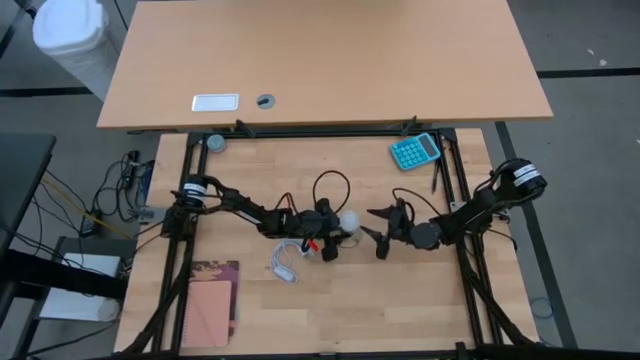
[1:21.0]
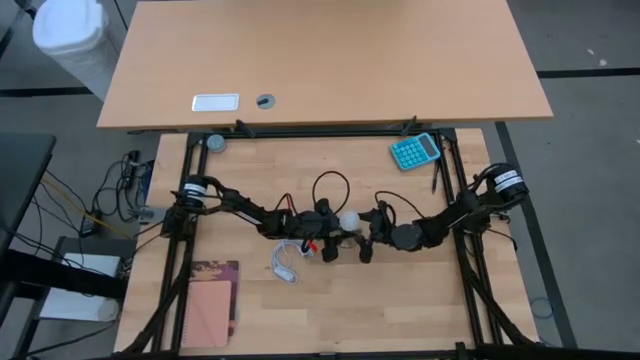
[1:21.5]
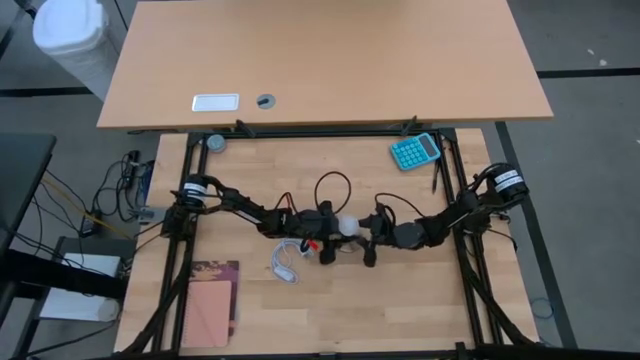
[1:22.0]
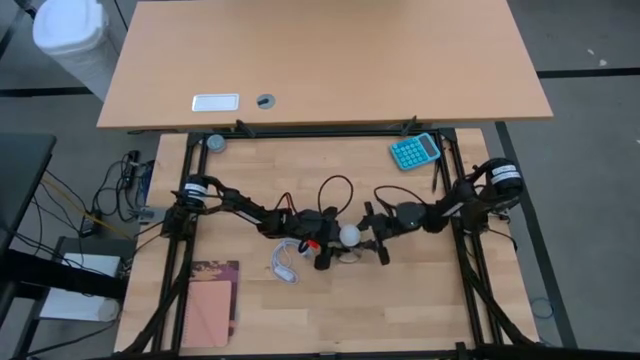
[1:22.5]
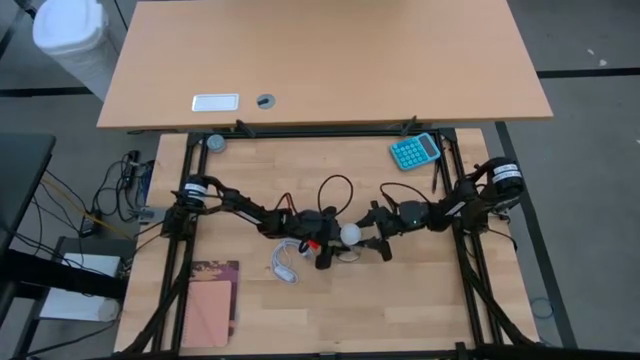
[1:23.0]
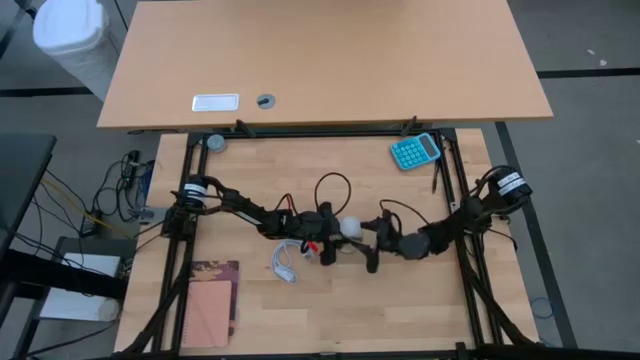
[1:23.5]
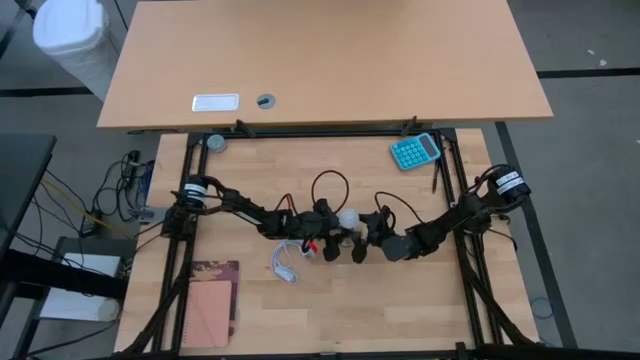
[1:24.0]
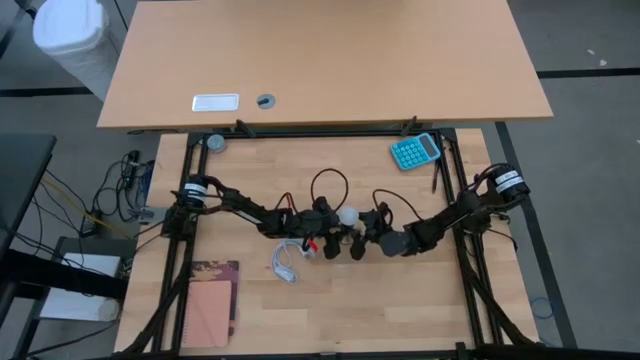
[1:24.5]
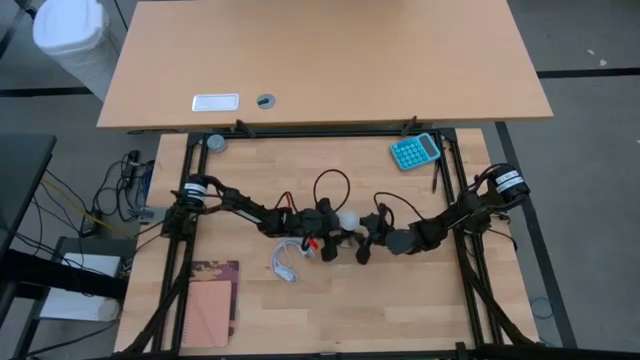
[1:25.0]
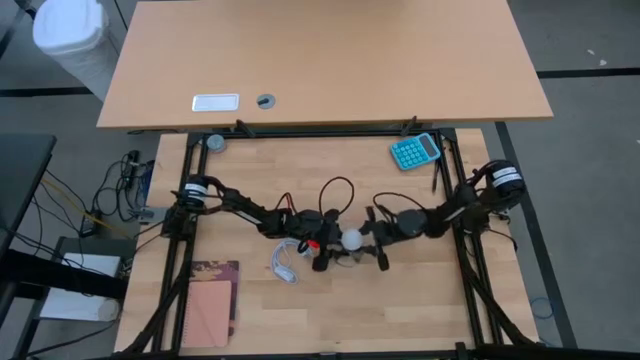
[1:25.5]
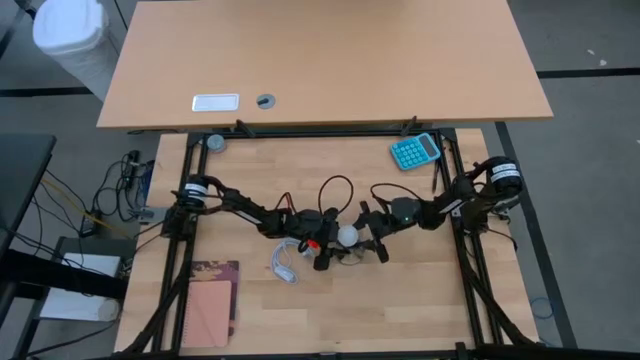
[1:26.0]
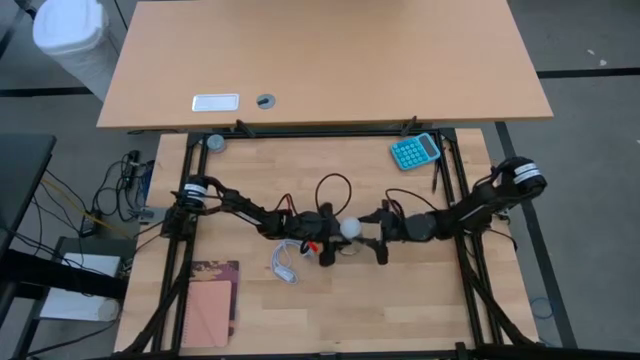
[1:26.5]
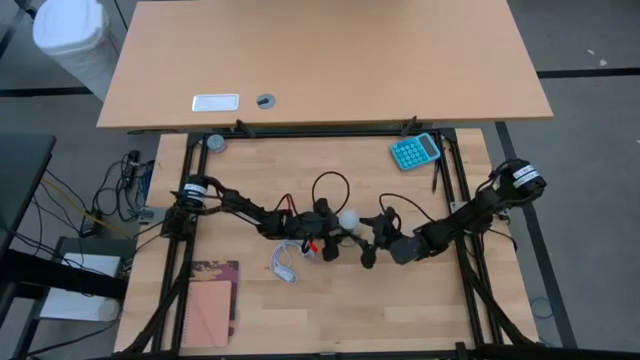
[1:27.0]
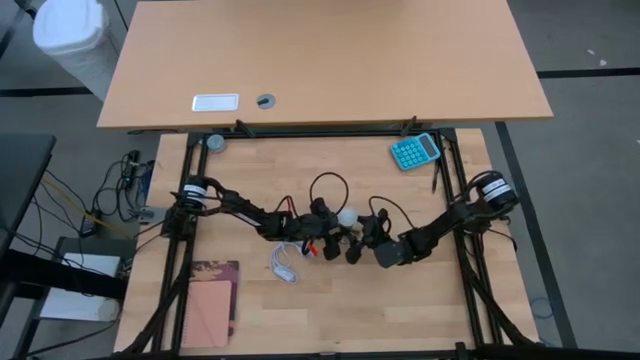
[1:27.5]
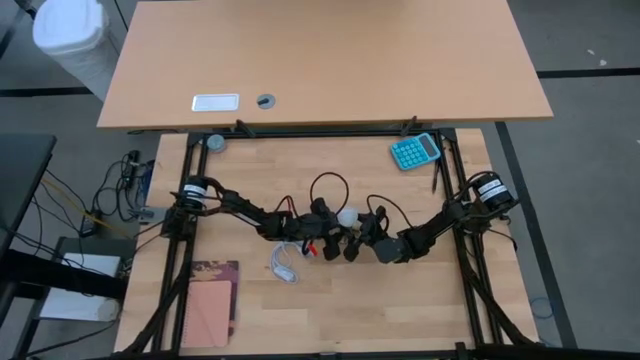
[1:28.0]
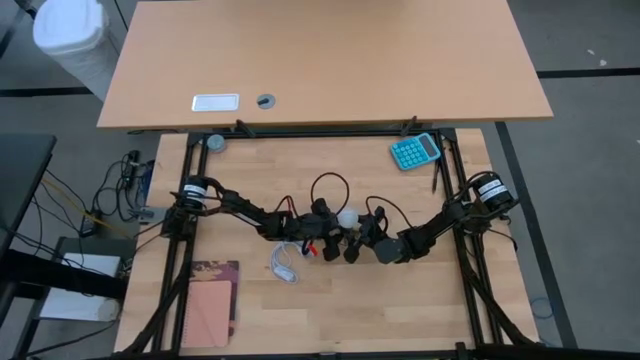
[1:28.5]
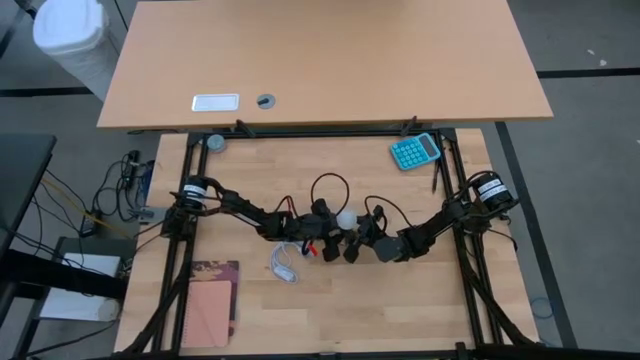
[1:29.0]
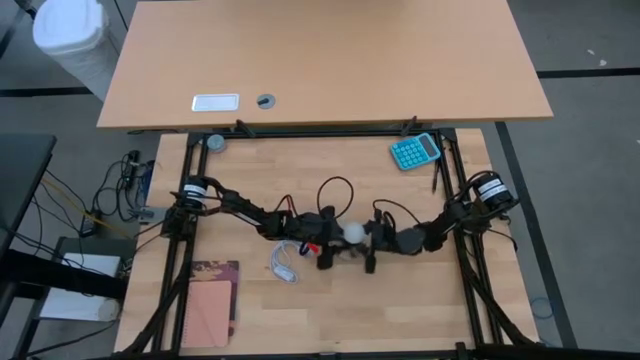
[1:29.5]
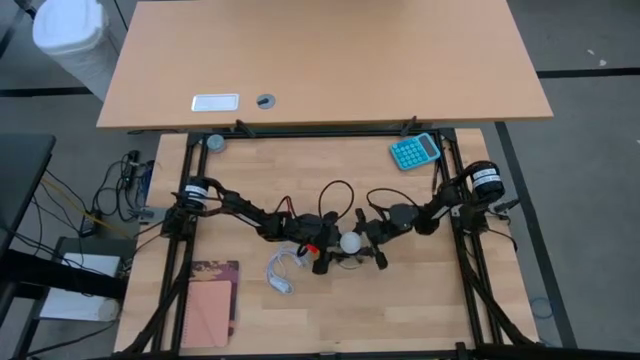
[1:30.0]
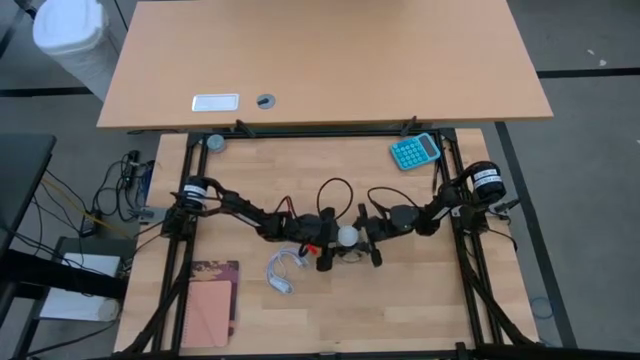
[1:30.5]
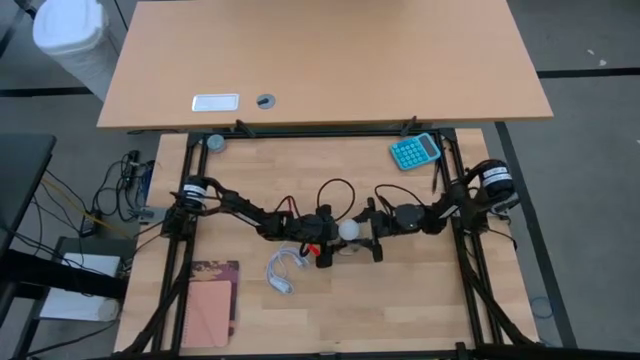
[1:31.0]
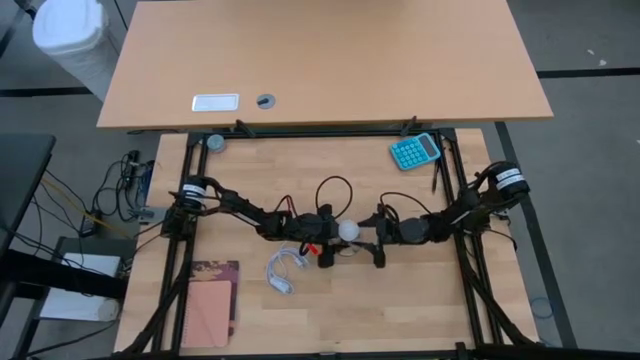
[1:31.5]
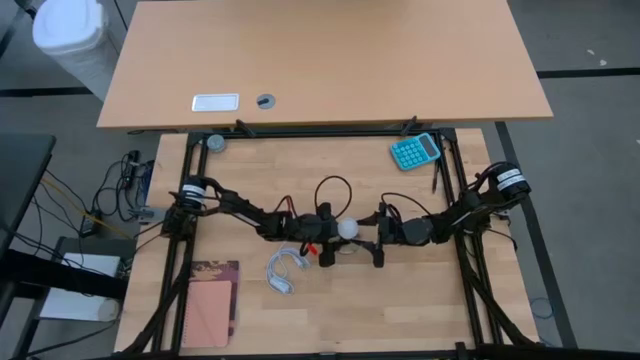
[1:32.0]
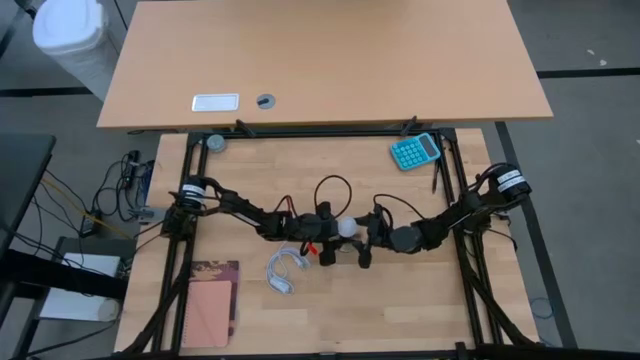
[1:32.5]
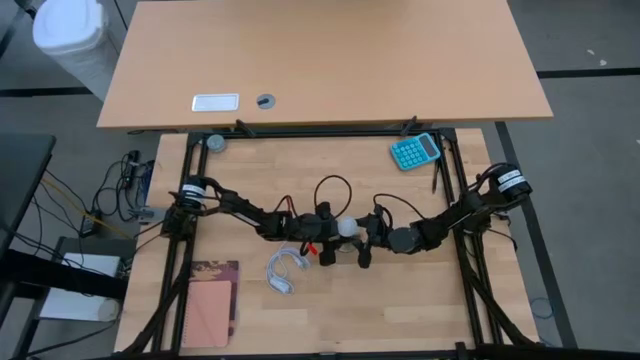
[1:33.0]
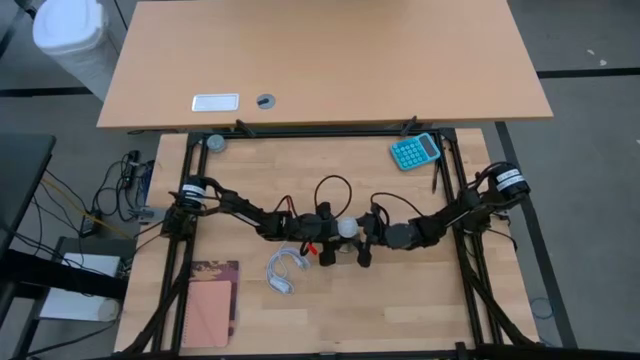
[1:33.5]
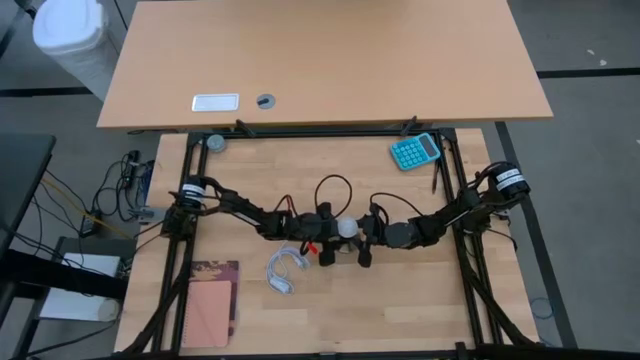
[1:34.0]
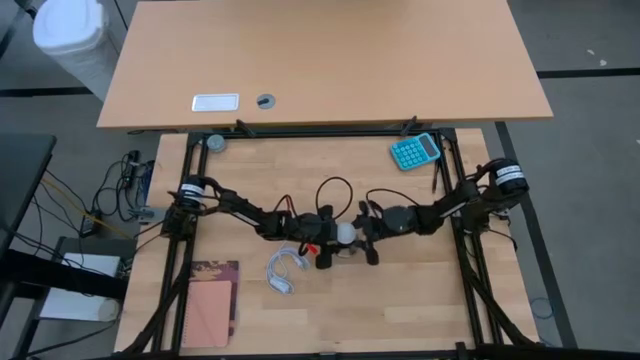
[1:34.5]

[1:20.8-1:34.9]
Task: Screw lightbulb
Remove the lightbulb from the lamp socket

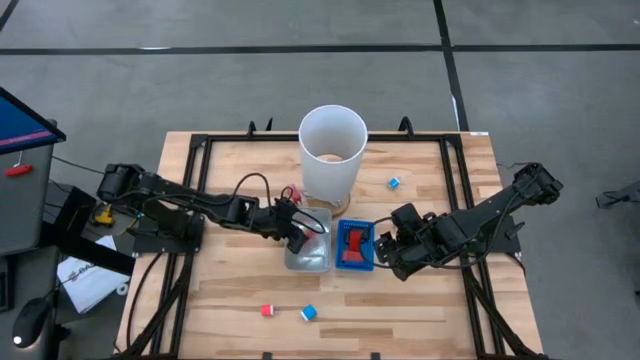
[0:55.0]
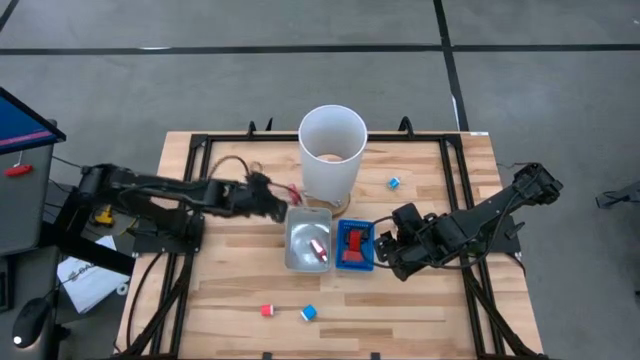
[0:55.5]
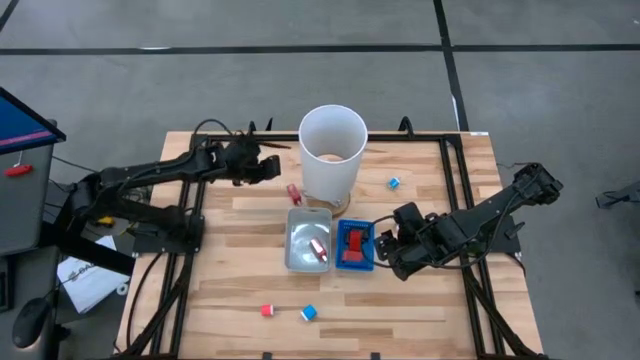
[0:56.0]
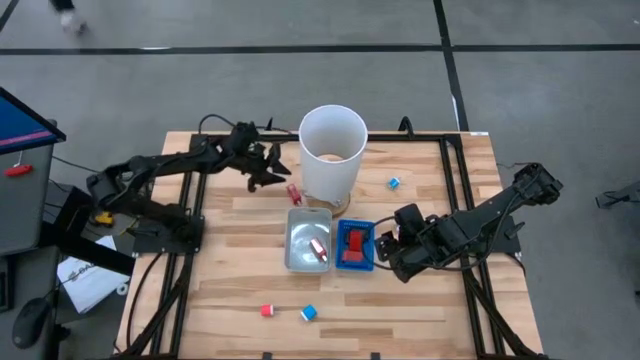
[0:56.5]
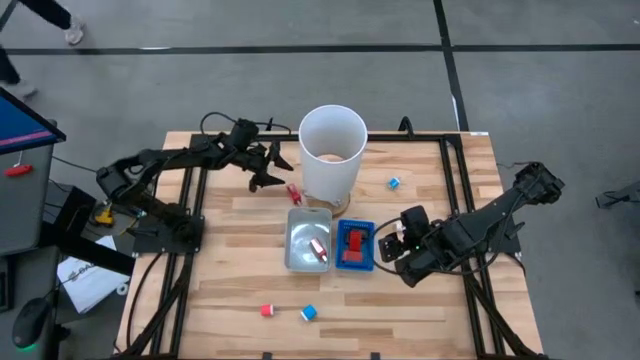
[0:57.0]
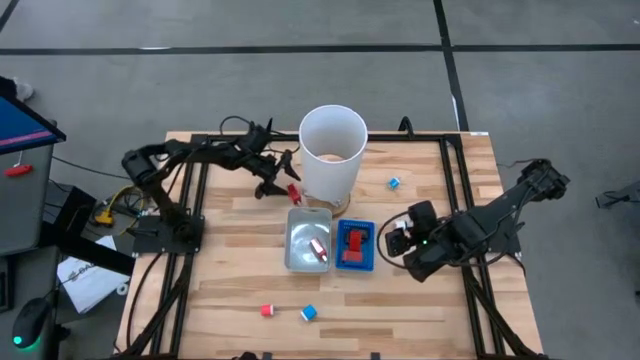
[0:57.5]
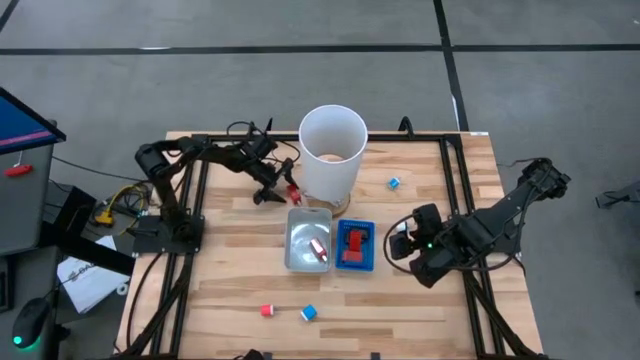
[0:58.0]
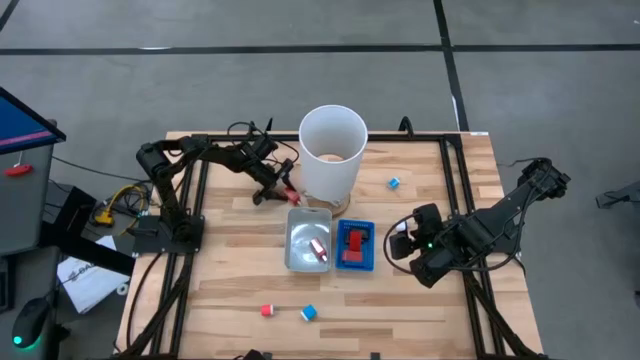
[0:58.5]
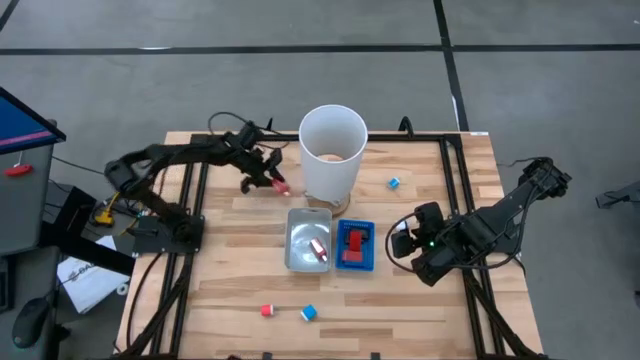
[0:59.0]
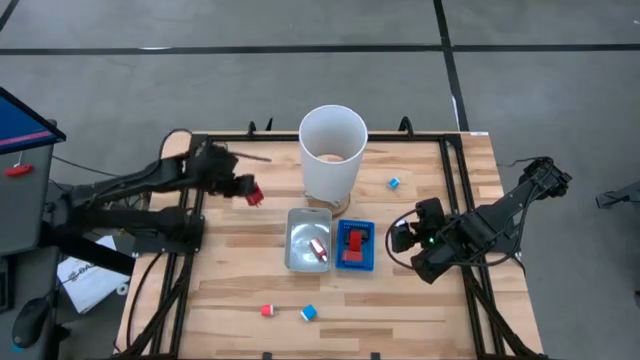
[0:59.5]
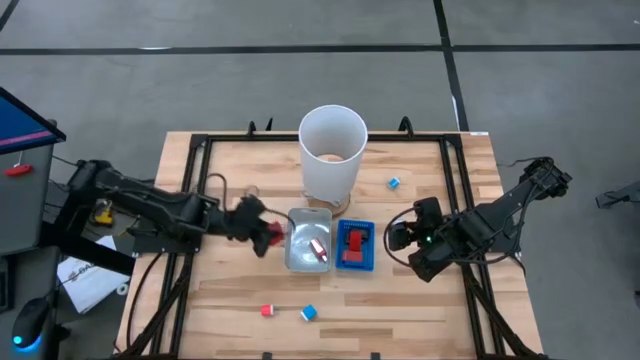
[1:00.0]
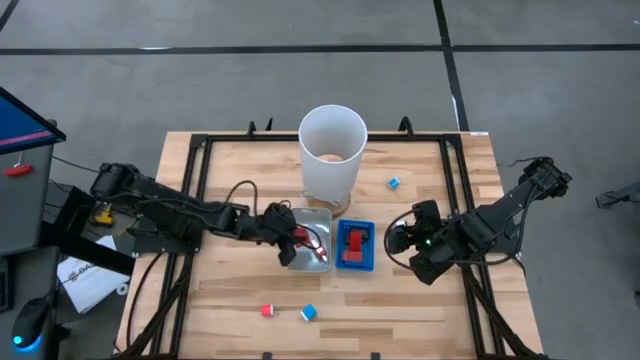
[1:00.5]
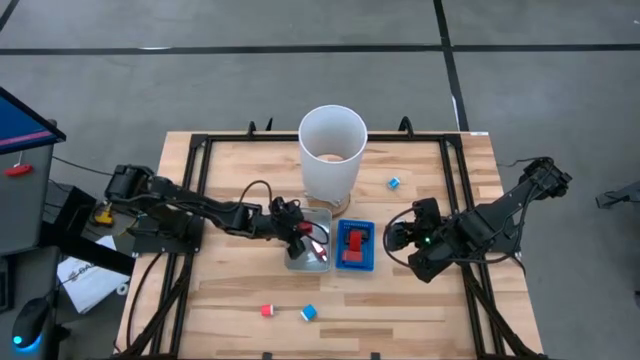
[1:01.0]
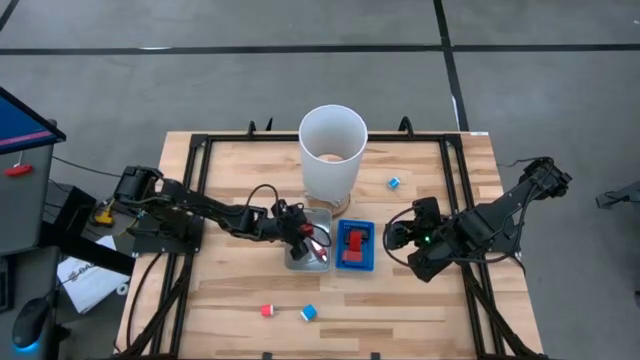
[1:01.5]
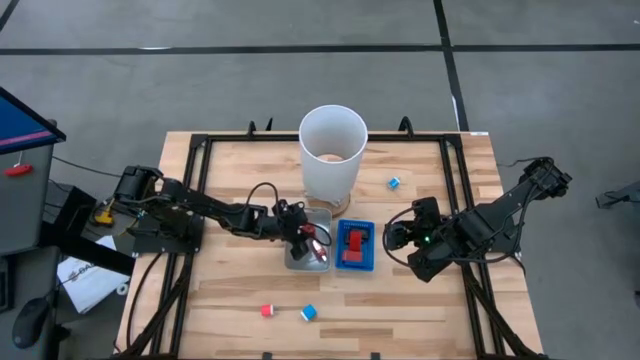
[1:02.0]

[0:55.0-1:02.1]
Task: Pick & Place Office items
Put the red charger adapter into the gray bin
